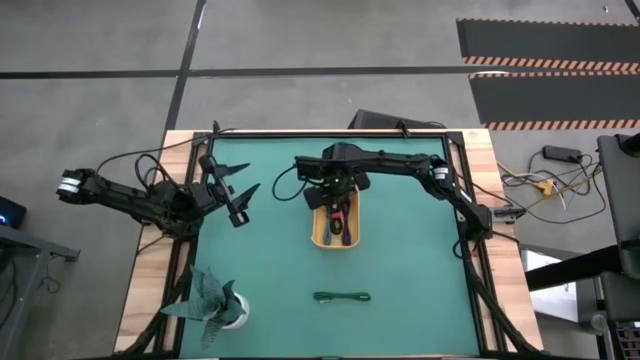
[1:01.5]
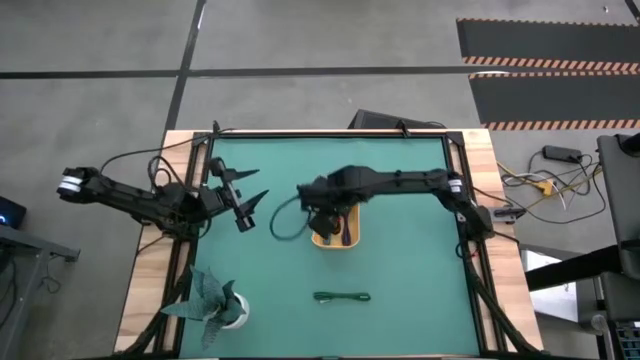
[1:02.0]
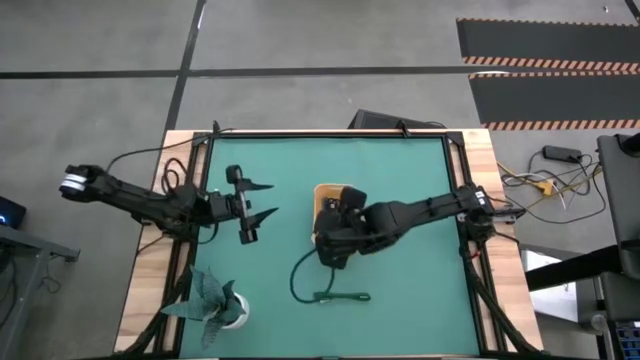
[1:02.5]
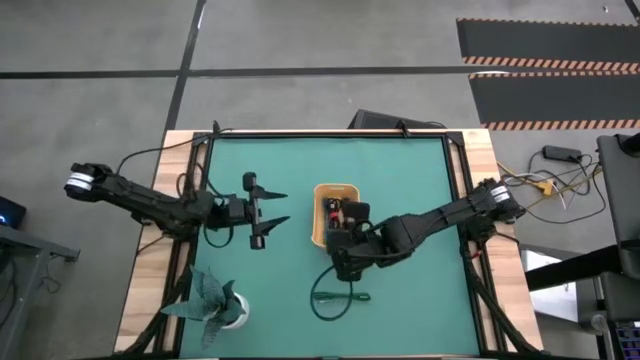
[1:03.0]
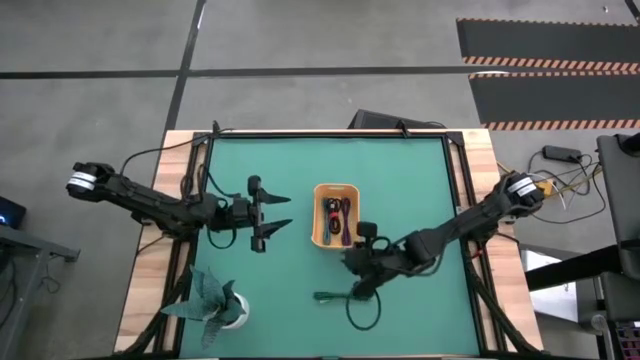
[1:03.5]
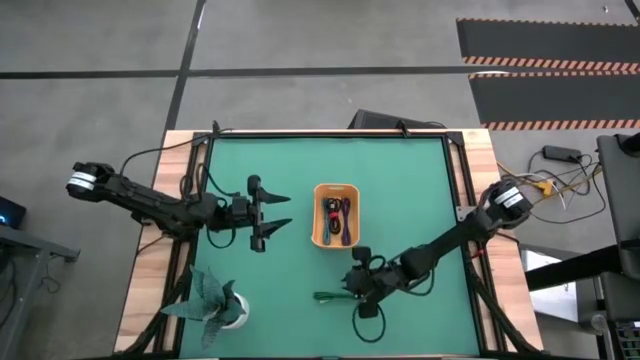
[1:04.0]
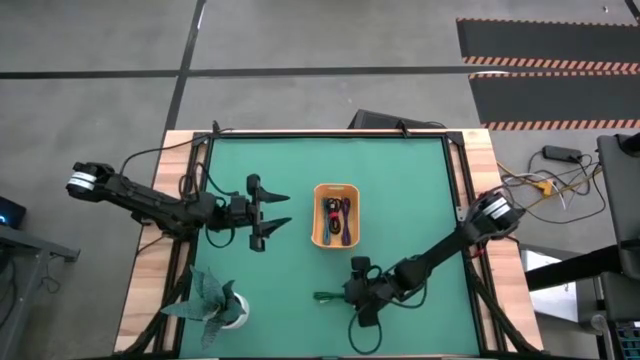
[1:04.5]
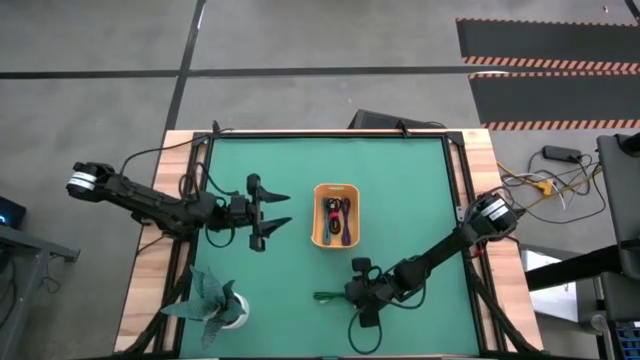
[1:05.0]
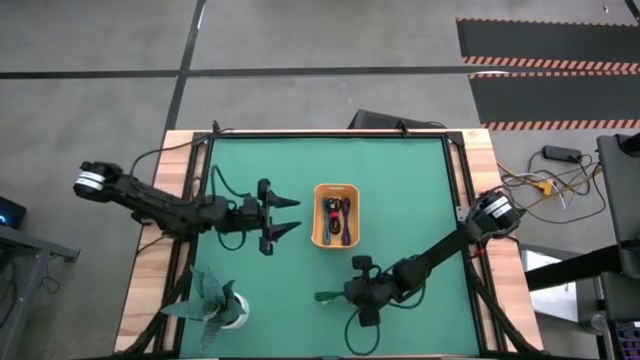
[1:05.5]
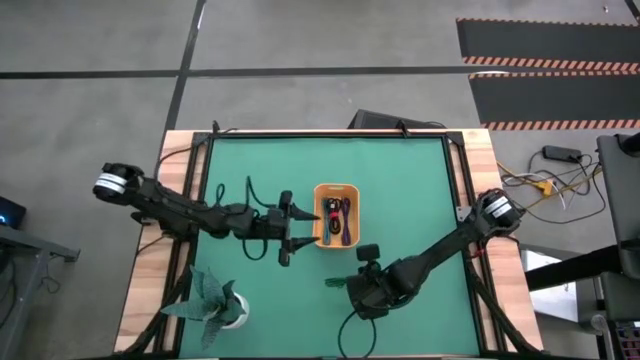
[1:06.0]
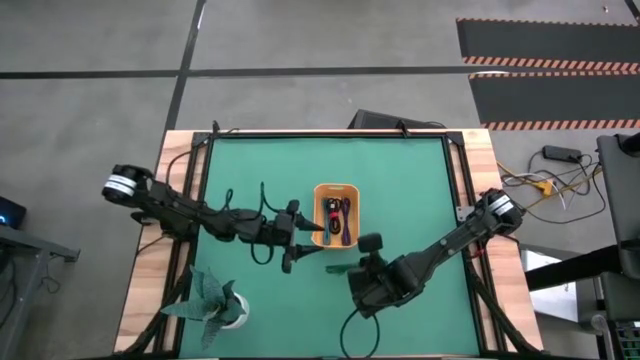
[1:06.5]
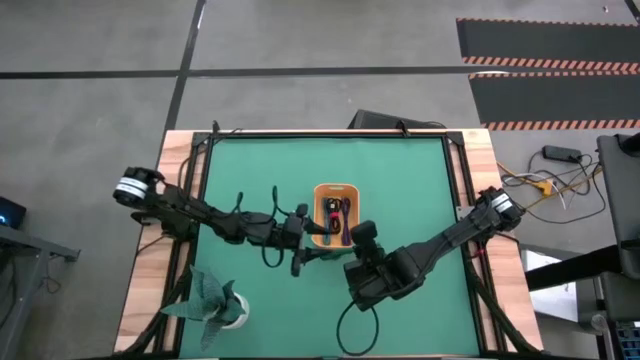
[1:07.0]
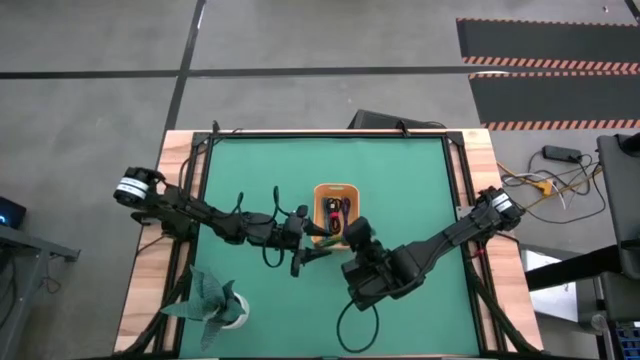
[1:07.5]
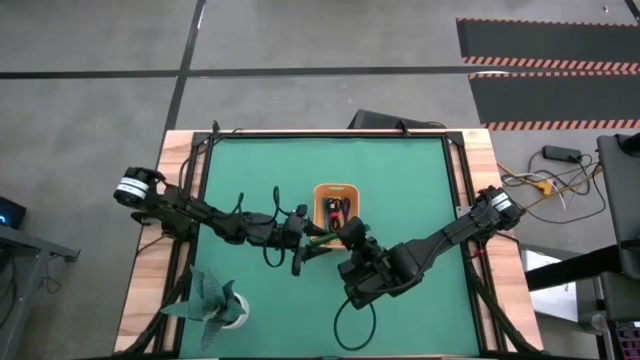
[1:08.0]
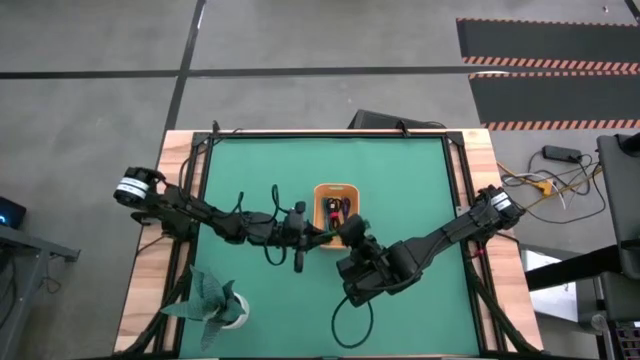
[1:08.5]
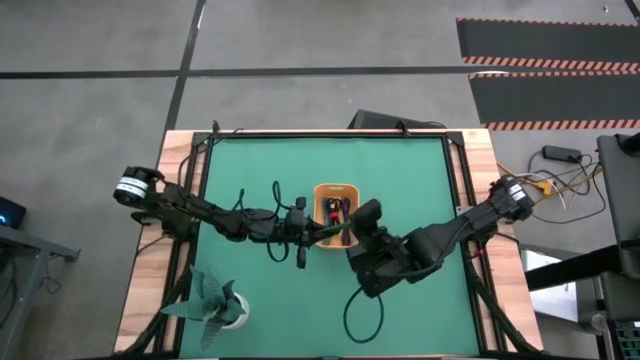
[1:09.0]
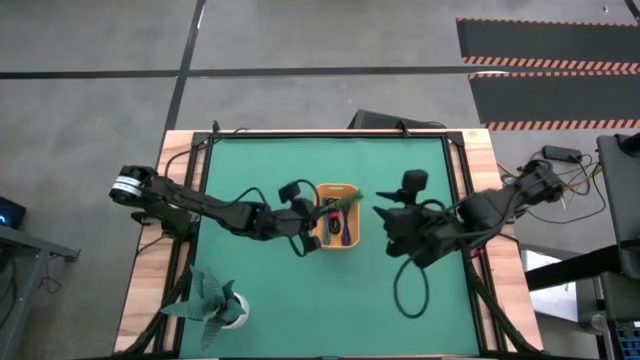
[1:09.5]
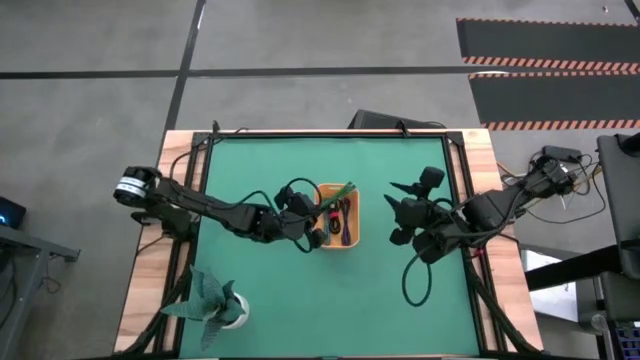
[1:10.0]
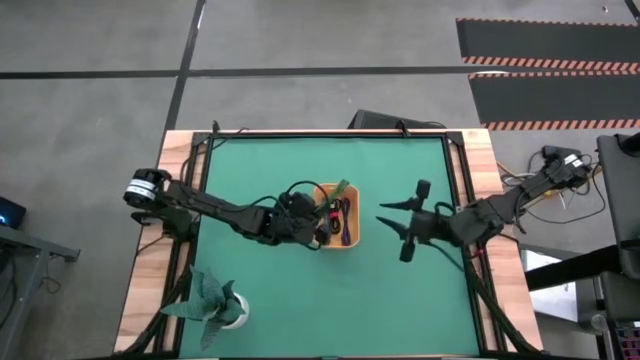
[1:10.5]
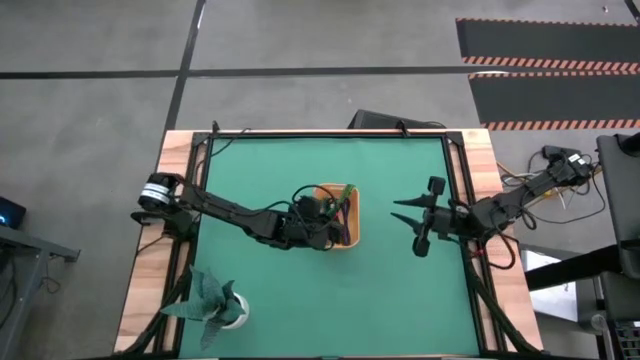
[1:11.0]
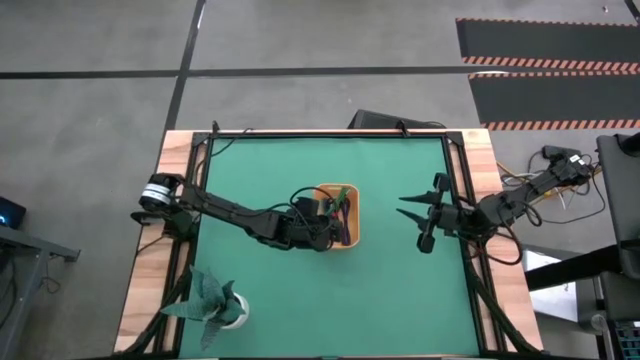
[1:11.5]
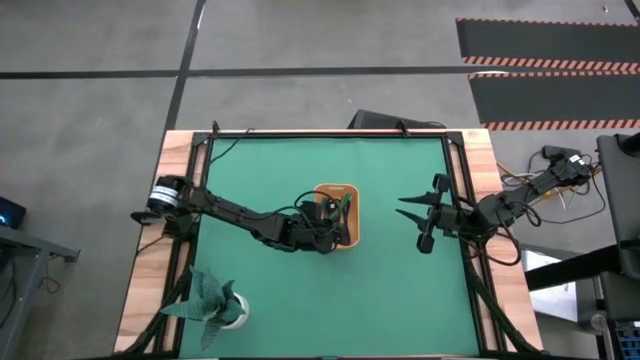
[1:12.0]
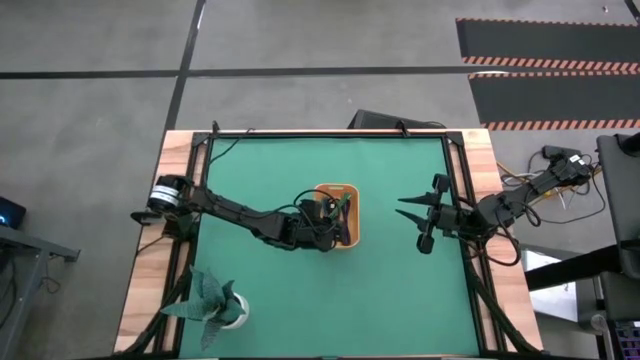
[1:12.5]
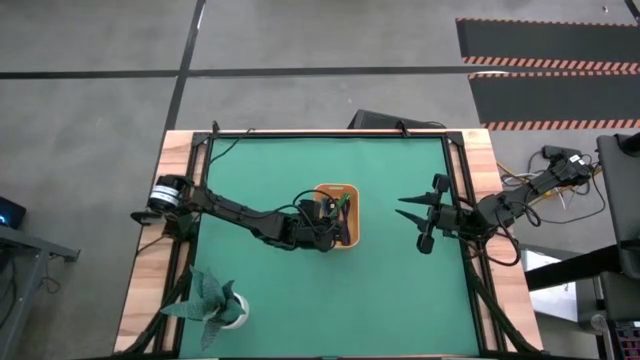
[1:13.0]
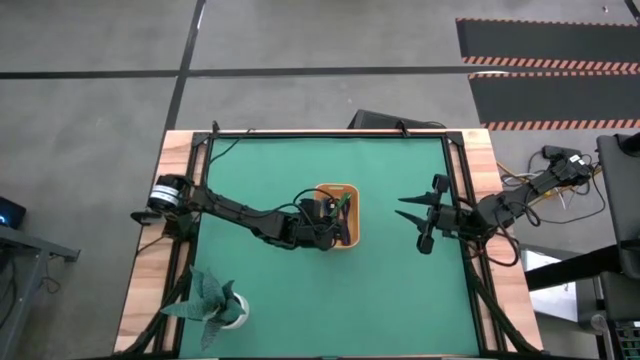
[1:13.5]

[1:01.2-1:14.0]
Task: Pick and place USB-C Cables
Put the green charger cable into the yellow bin

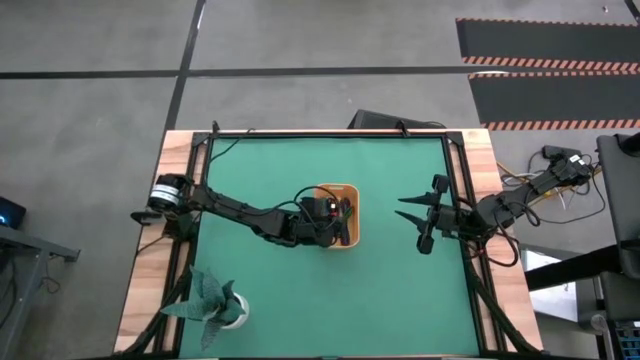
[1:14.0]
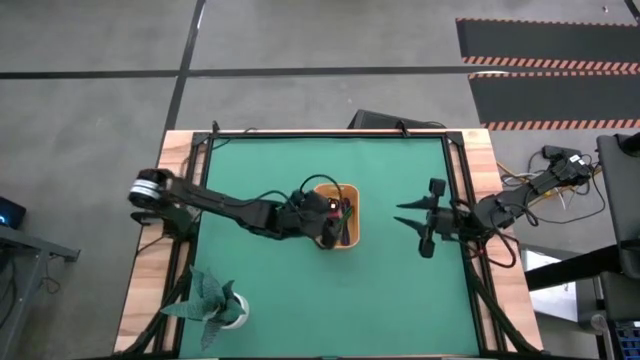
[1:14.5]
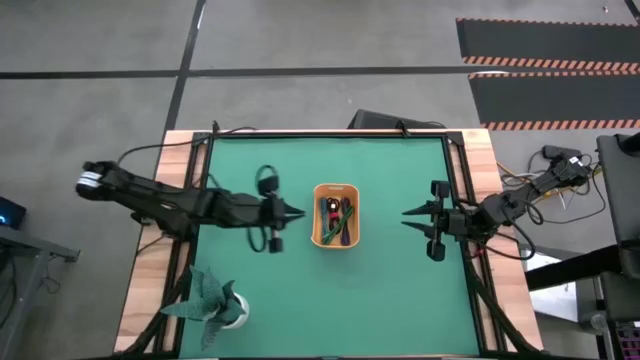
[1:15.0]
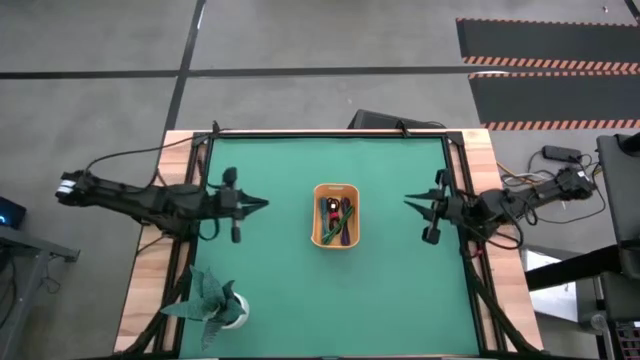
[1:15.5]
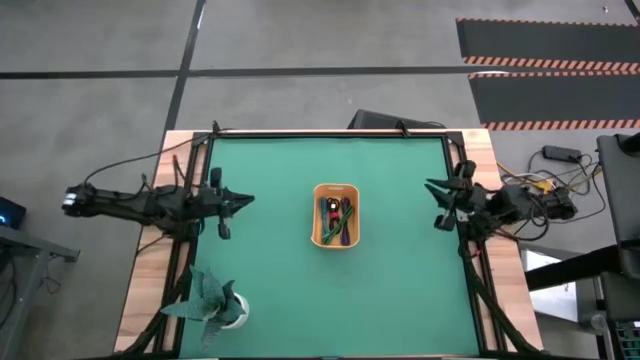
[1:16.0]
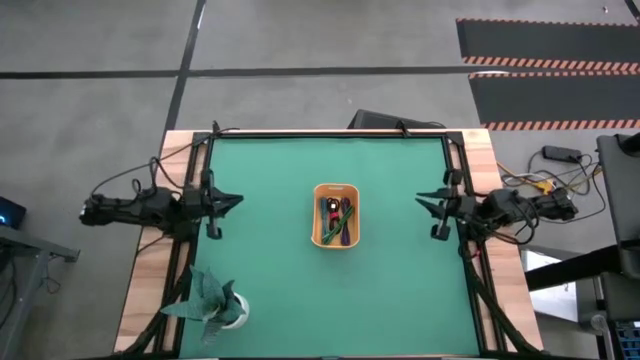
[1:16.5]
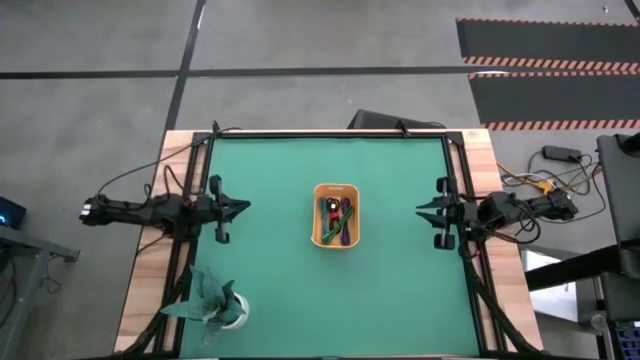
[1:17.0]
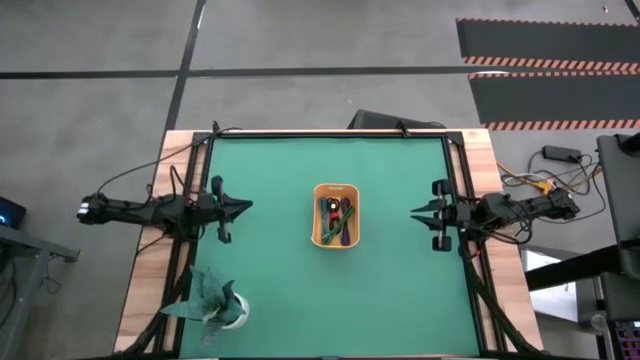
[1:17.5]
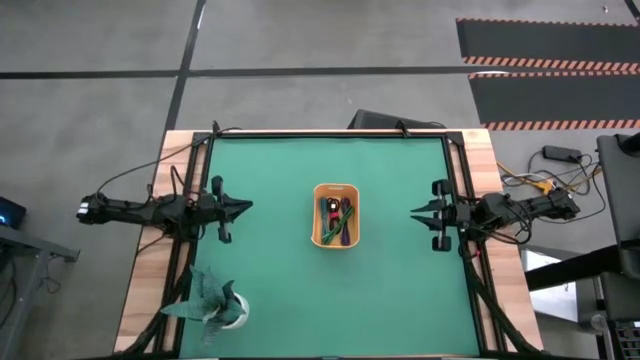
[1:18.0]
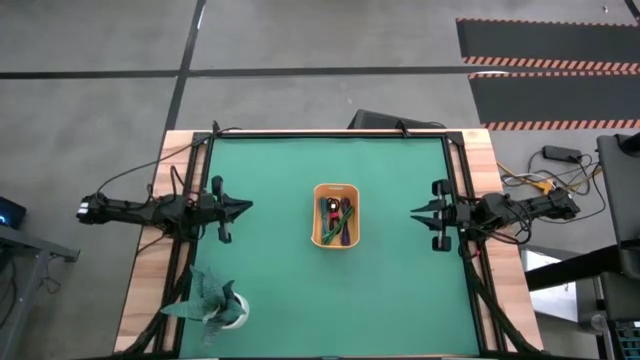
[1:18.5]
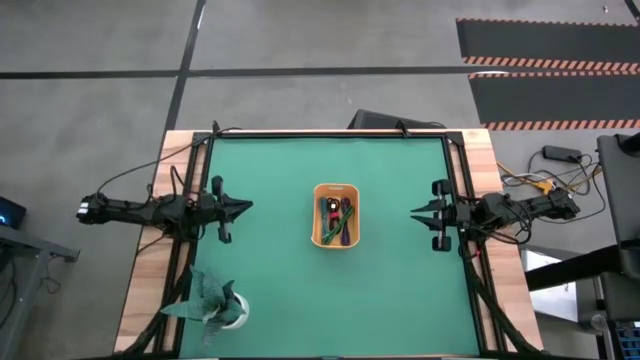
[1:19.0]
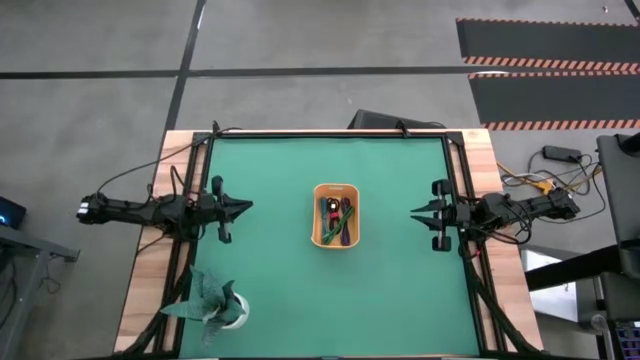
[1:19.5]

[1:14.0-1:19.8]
Return to Home Position

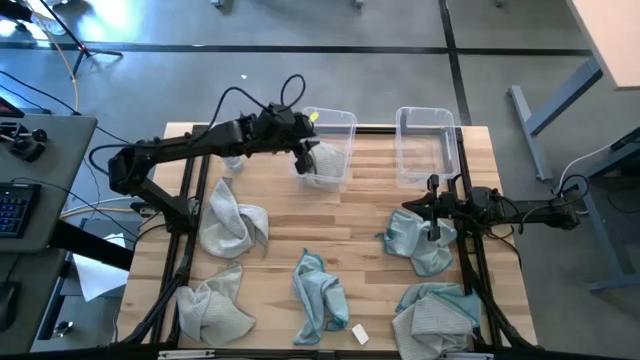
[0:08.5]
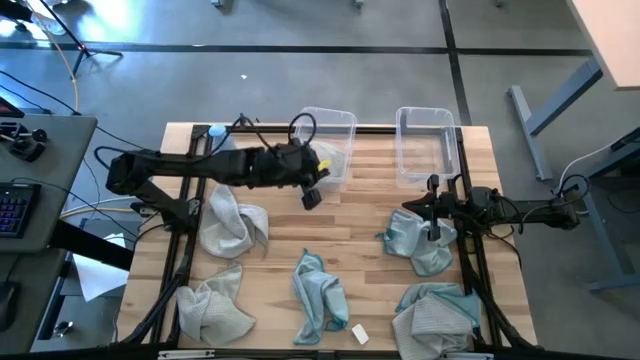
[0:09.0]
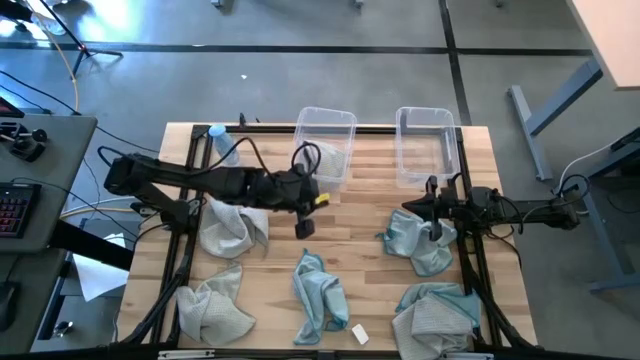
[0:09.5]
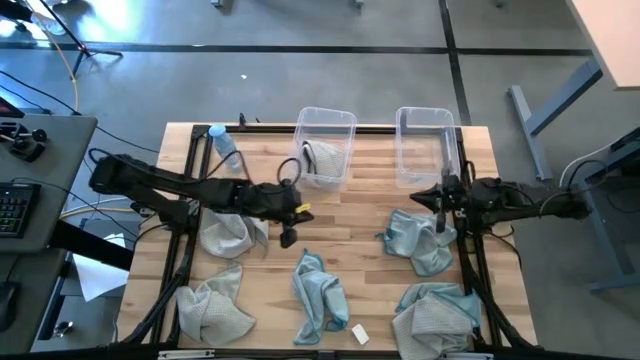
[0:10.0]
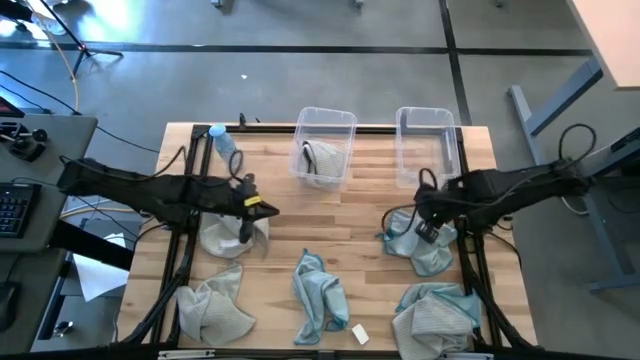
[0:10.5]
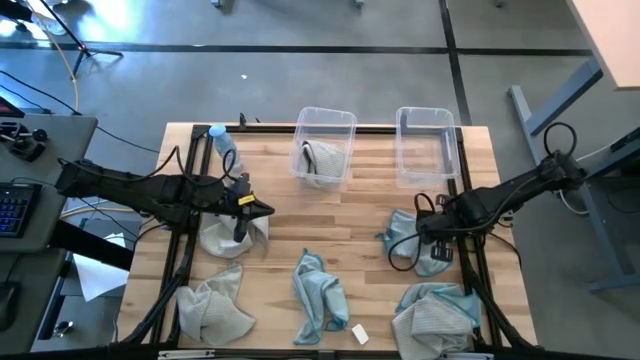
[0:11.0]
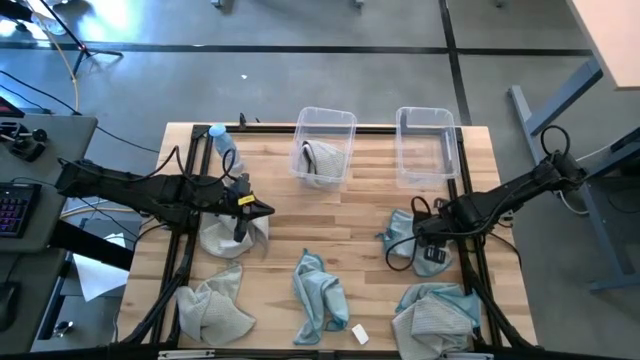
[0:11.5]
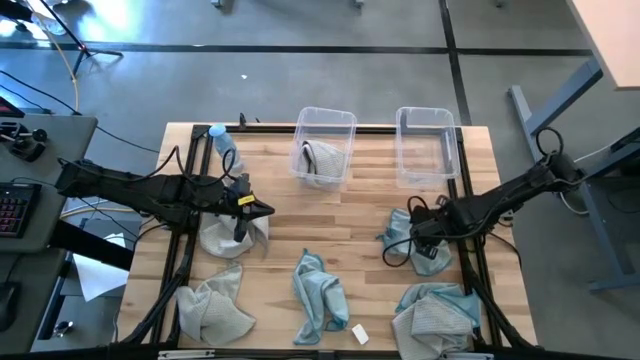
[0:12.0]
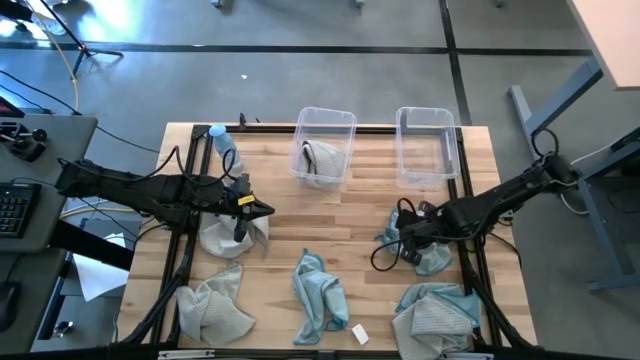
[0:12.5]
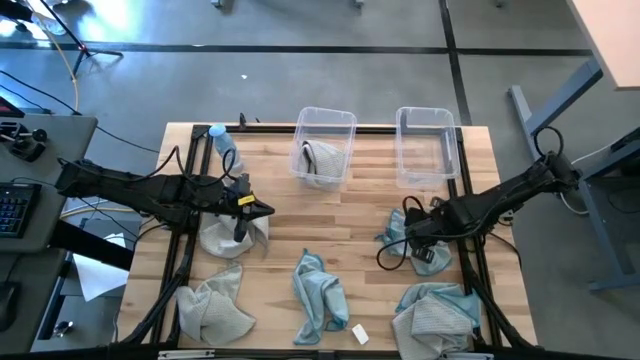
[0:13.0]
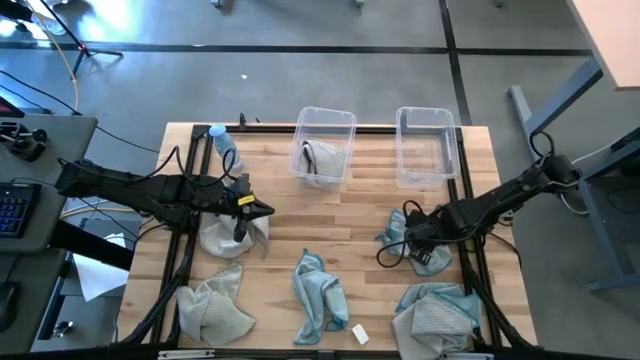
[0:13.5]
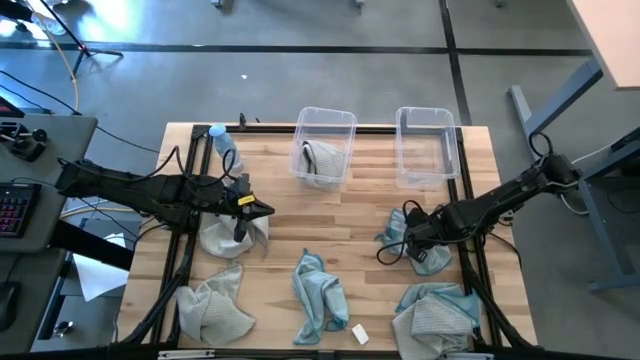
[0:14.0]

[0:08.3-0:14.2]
Task: Sort microfiber towel by color & place in baskets
Put the light blue microfiber cloth into the right transparent bin
